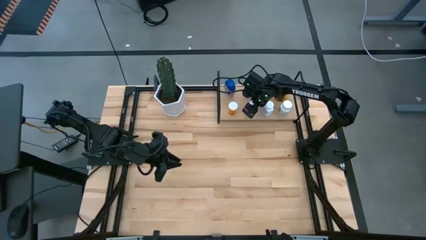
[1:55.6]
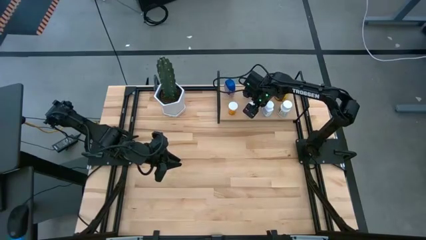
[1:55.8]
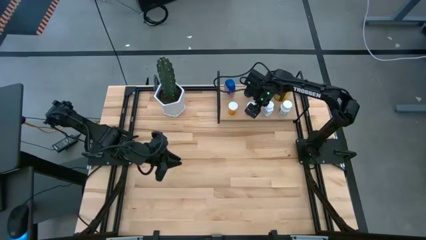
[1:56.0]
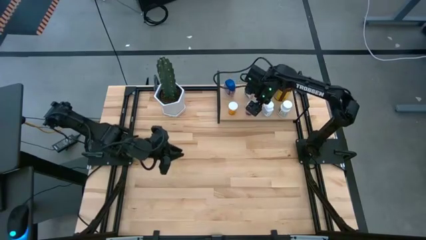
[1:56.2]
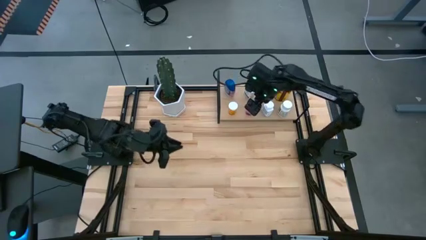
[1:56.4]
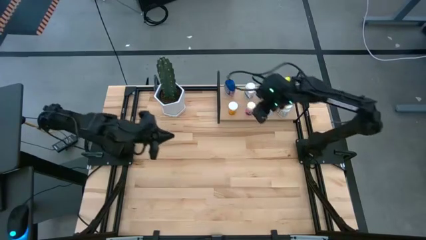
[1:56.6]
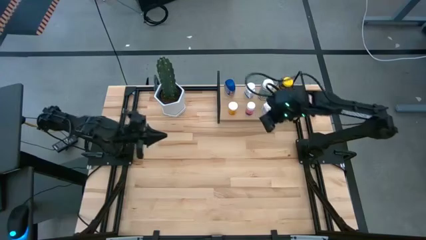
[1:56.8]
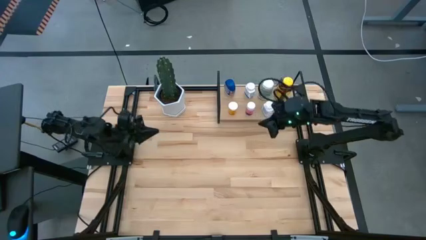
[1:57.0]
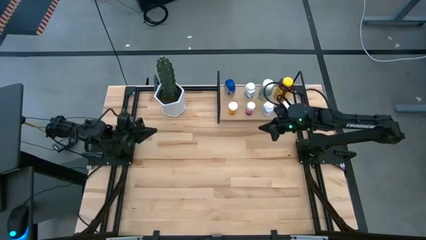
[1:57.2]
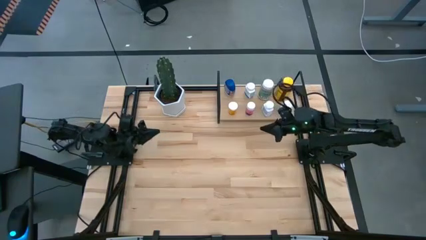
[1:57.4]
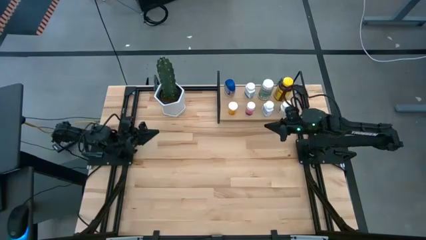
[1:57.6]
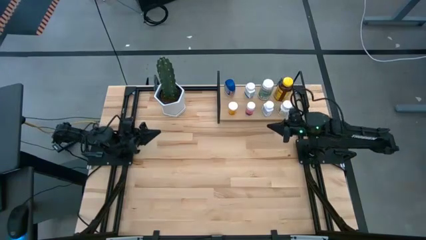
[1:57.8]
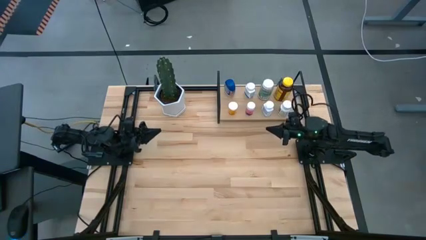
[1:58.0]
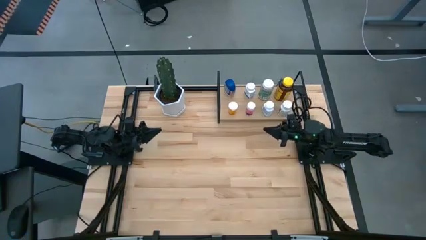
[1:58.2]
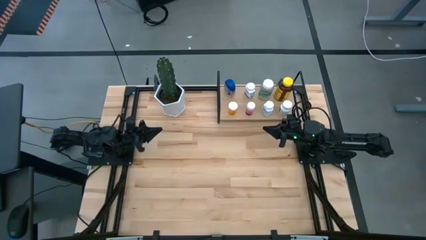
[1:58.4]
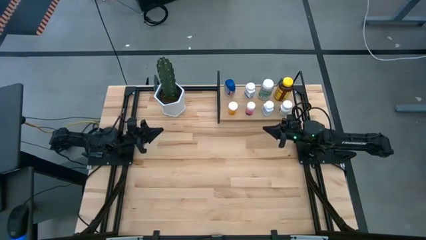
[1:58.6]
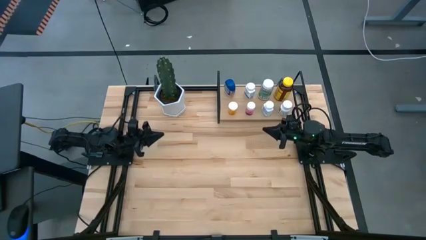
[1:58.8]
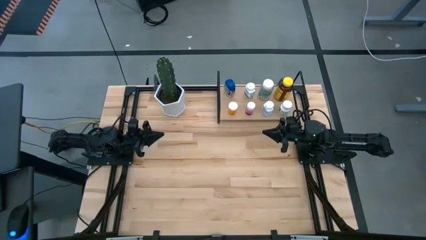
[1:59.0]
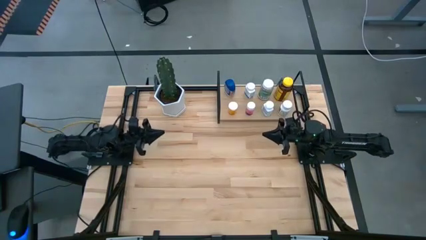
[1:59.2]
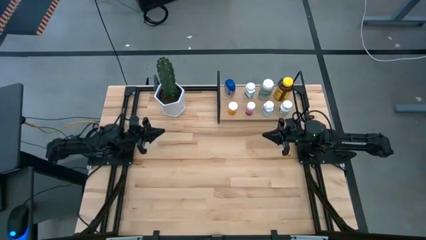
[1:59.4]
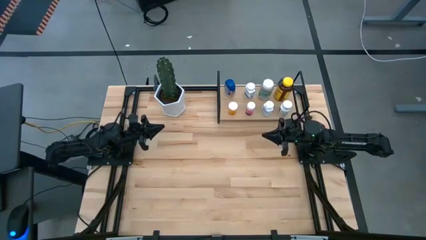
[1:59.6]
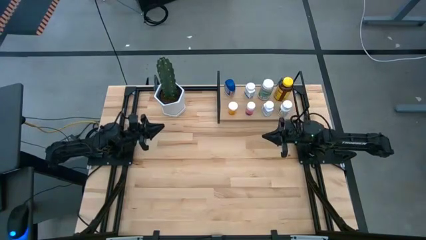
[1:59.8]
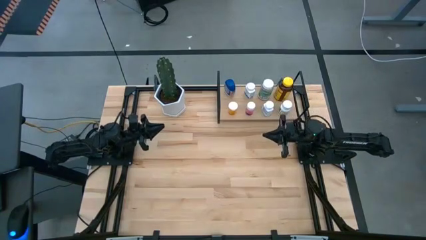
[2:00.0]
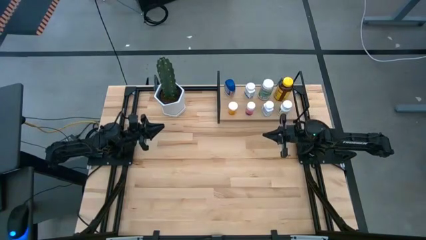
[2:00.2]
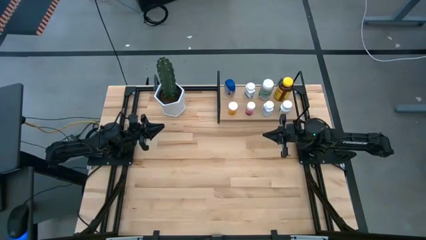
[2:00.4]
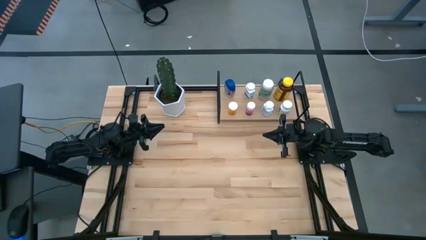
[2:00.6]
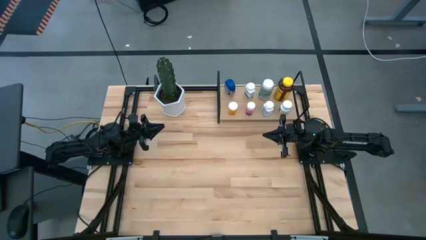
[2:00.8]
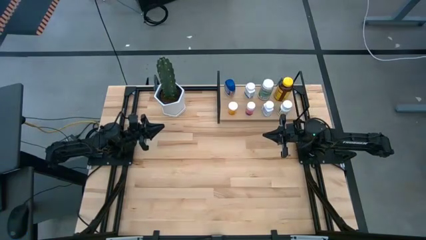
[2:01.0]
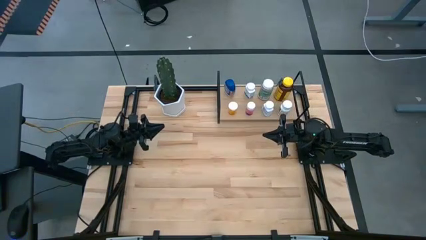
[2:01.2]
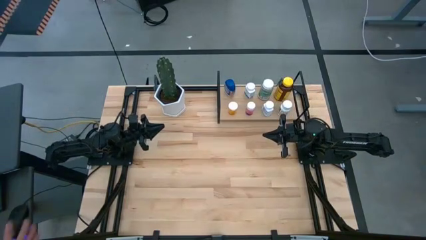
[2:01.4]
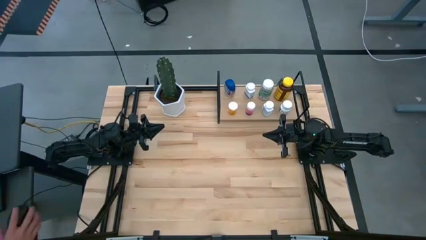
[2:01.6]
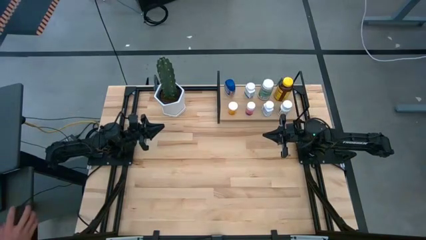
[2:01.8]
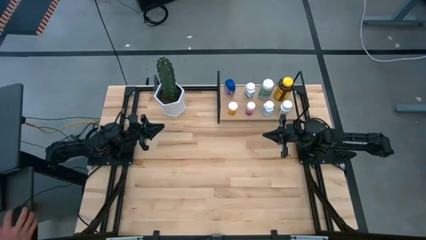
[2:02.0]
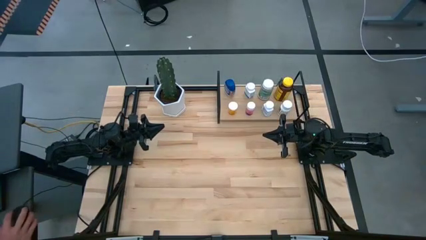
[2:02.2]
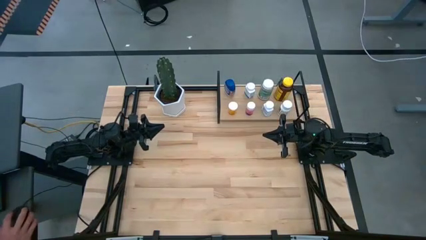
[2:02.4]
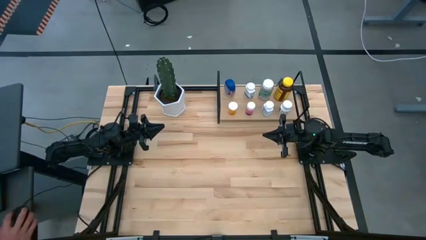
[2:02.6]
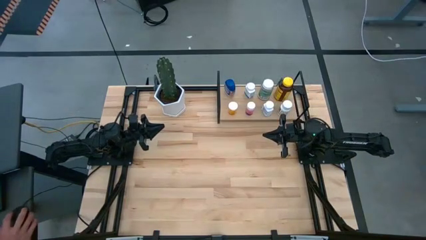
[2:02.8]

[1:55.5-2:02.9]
Task: Pick and place medicine bottles onto shelf by color
Return to Home Position

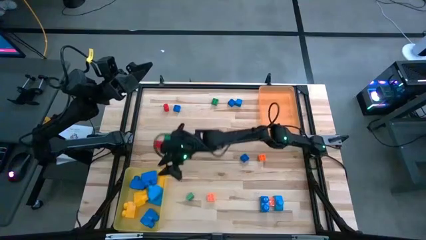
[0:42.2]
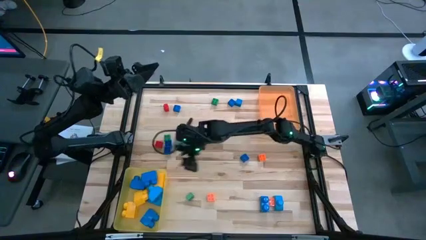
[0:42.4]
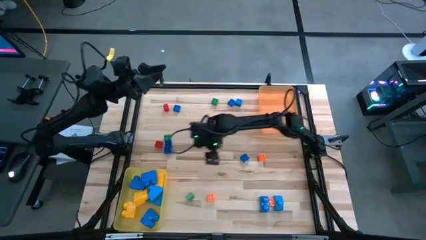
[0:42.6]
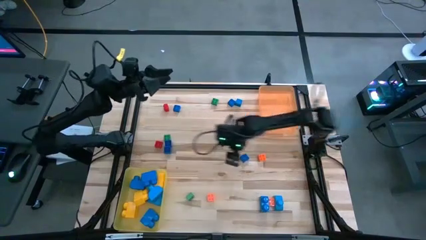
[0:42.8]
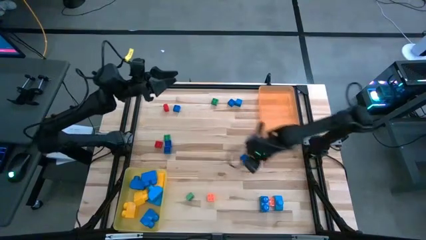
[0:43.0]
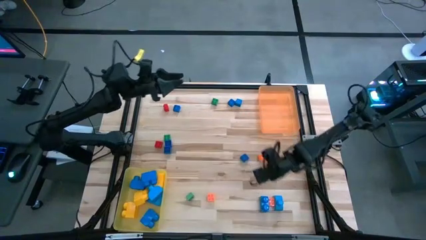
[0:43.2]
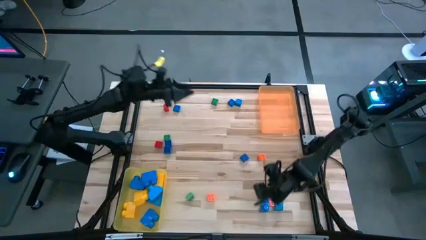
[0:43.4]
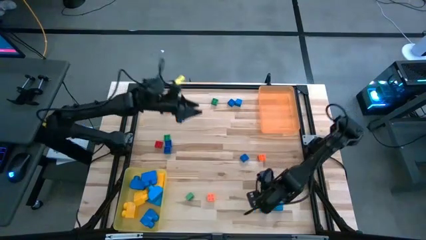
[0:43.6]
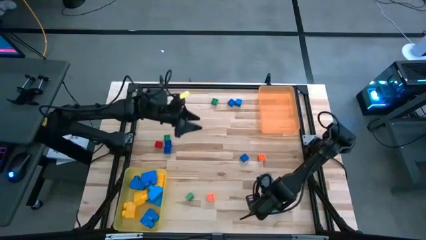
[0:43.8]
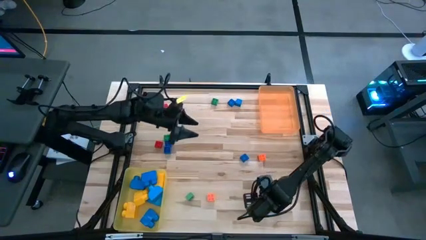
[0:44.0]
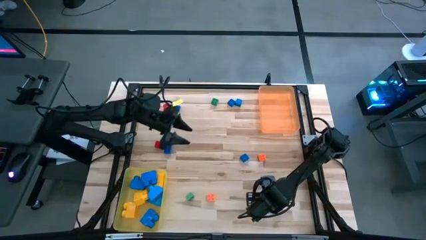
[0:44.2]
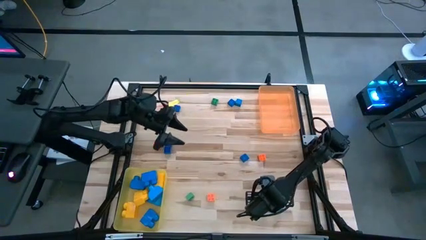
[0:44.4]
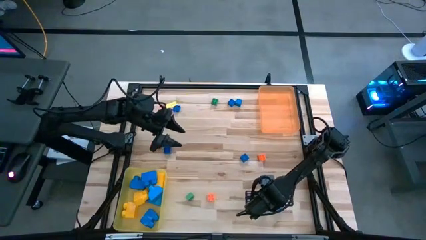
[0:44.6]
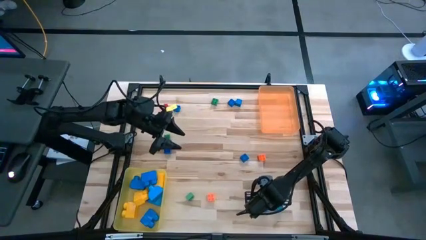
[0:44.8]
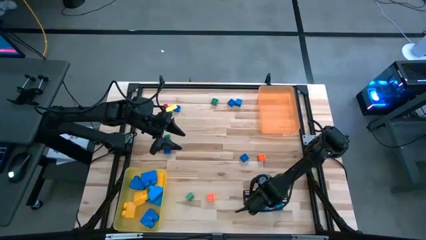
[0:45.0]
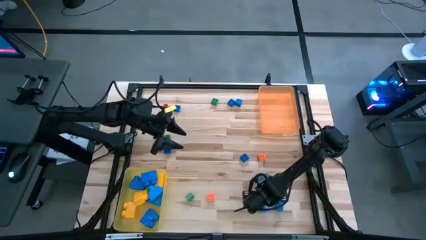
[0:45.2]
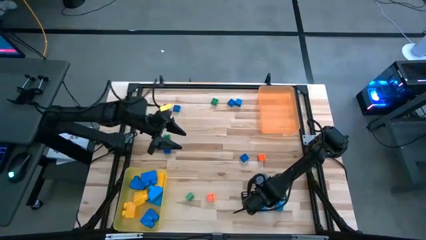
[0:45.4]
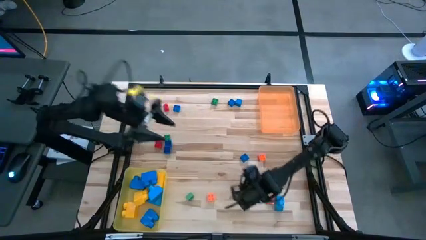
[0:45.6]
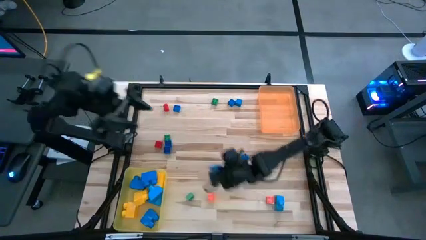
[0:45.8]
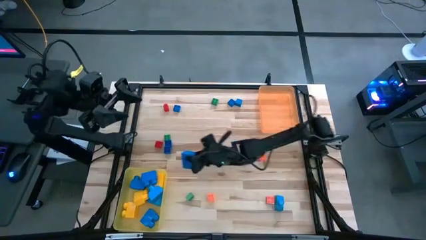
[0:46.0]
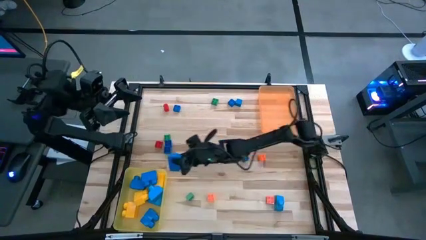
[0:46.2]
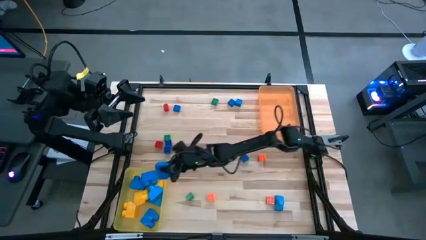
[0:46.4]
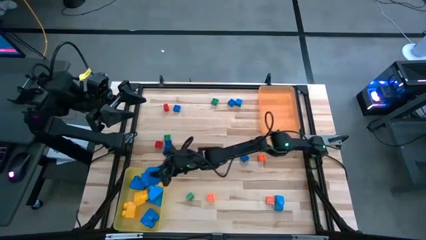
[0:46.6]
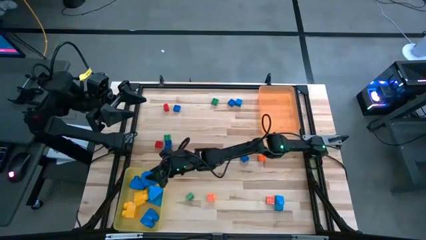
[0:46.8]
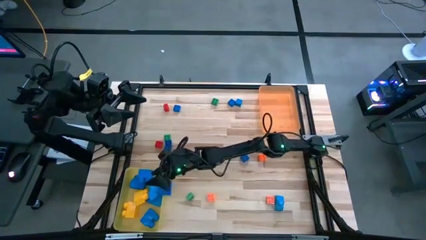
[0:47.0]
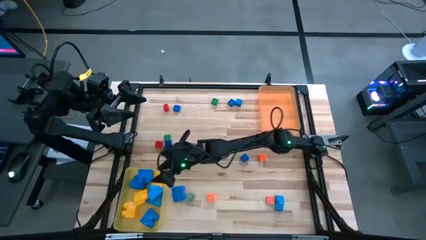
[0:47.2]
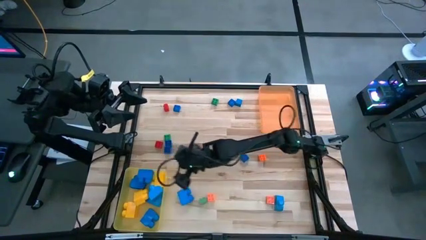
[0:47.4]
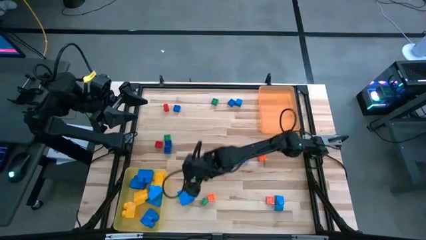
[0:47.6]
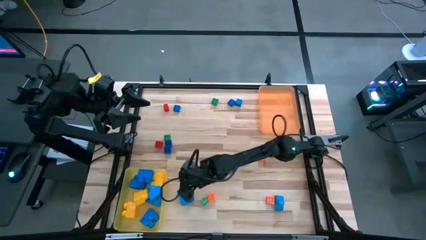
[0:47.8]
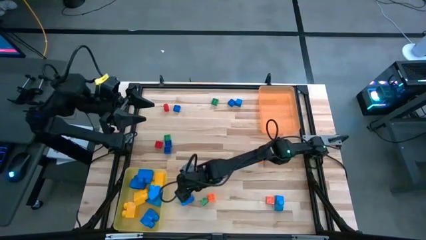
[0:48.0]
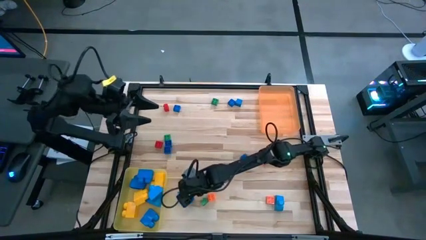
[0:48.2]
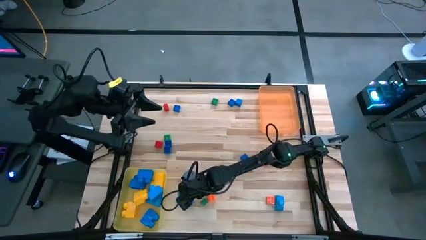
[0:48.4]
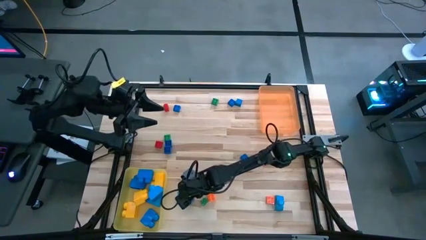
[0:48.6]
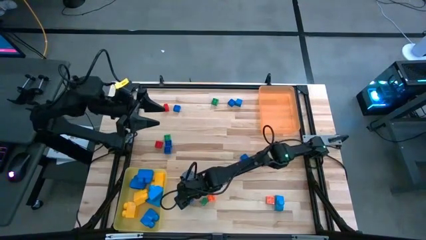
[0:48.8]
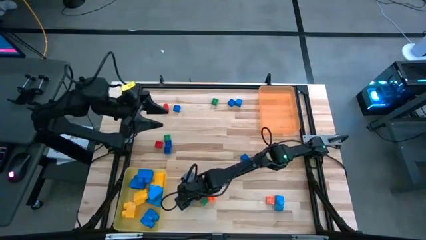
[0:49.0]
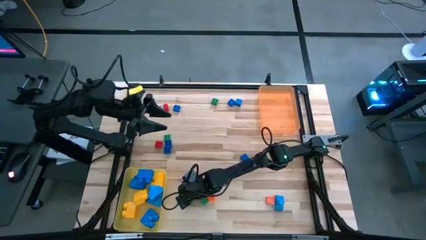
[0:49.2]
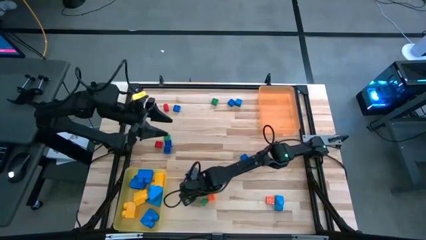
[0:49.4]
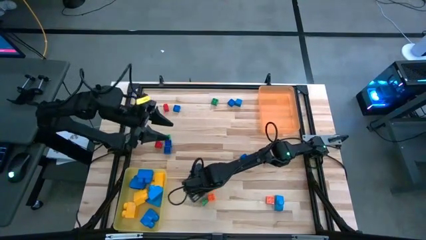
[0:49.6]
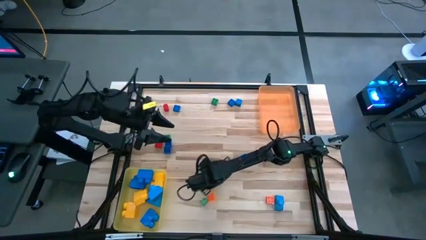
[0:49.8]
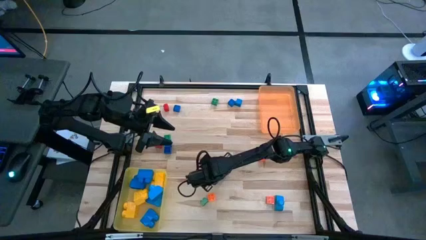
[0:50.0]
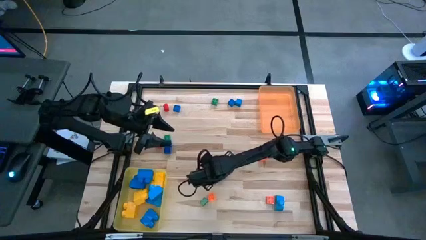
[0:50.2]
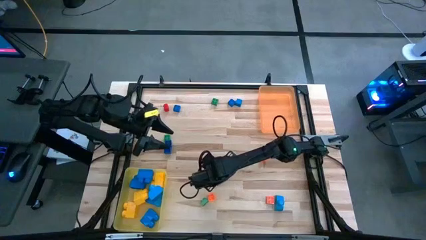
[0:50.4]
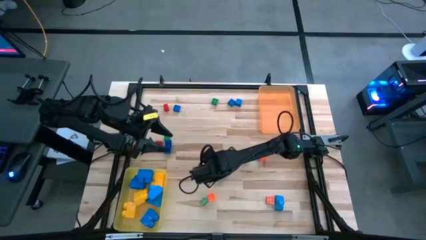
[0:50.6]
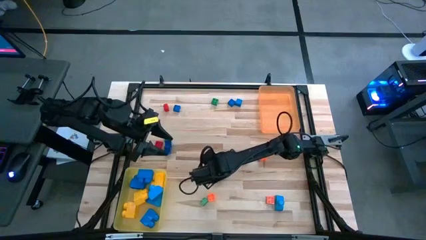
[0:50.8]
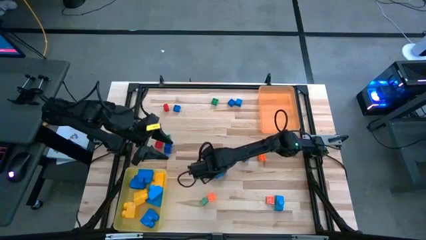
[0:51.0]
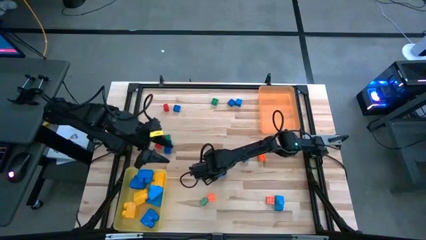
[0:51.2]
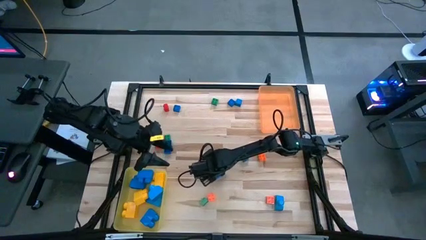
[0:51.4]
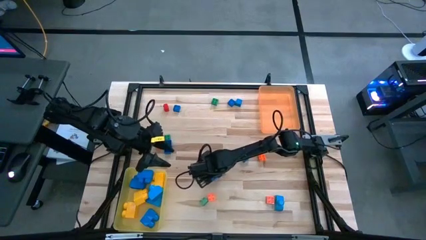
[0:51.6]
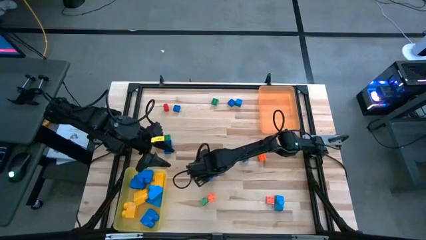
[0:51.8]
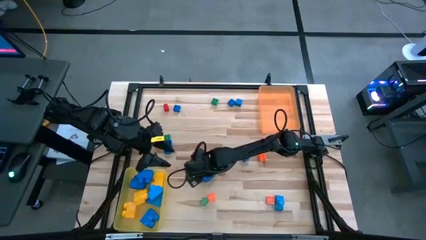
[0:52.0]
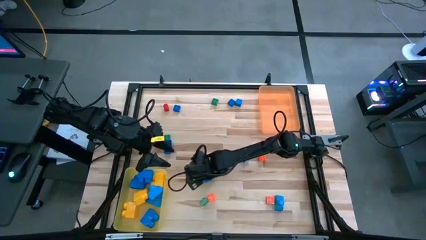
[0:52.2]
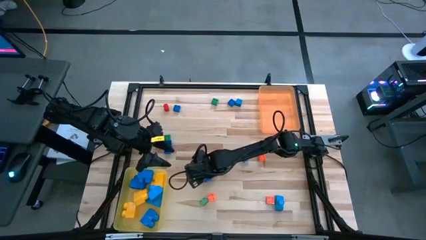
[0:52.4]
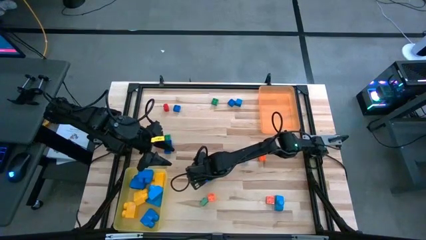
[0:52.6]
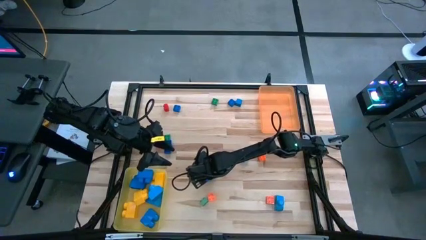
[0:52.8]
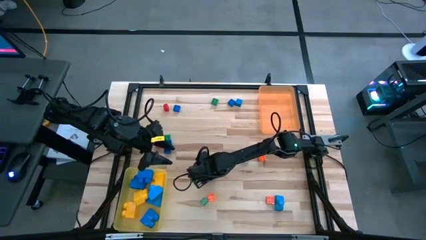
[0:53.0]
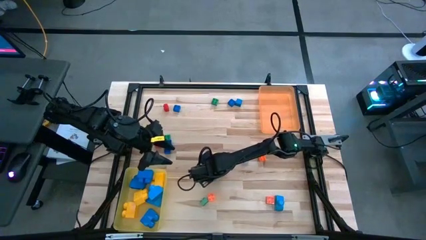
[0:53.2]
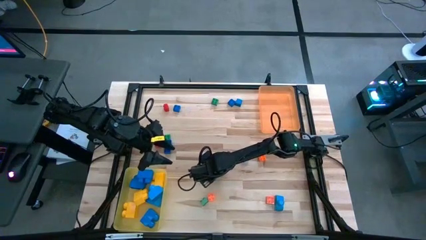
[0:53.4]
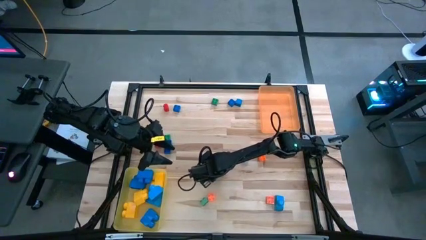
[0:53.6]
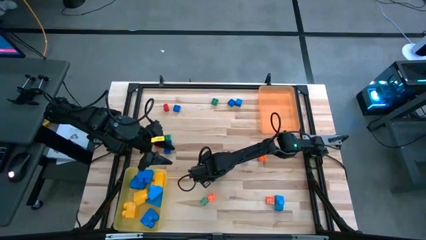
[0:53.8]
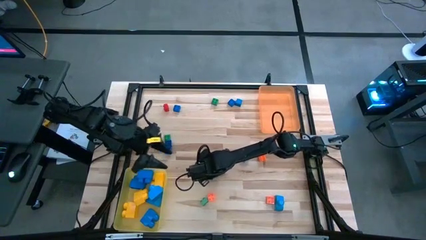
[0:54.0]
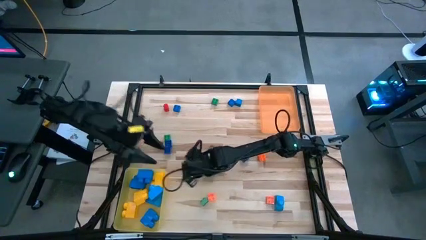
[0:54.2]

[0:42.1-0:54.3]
Task: Sort blocks by size
Put the large blue game piece into the yellow bin
